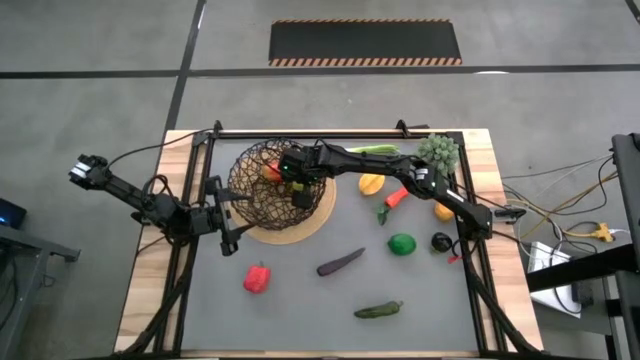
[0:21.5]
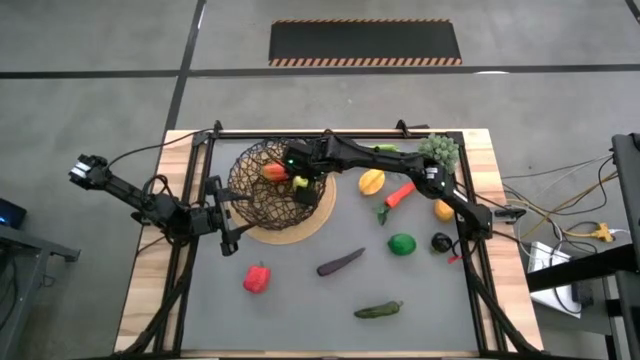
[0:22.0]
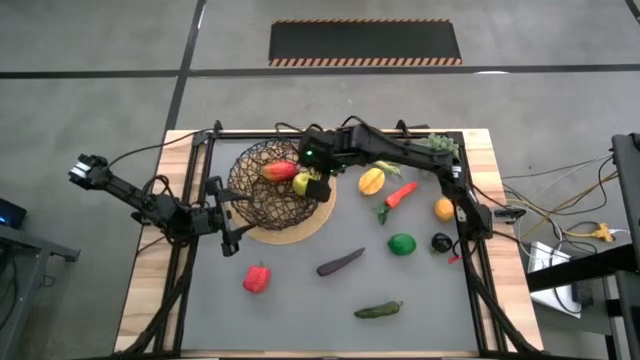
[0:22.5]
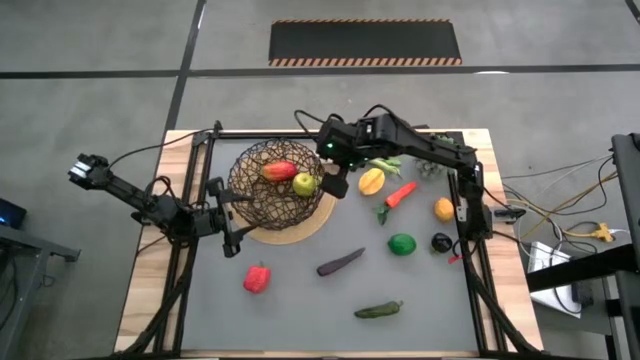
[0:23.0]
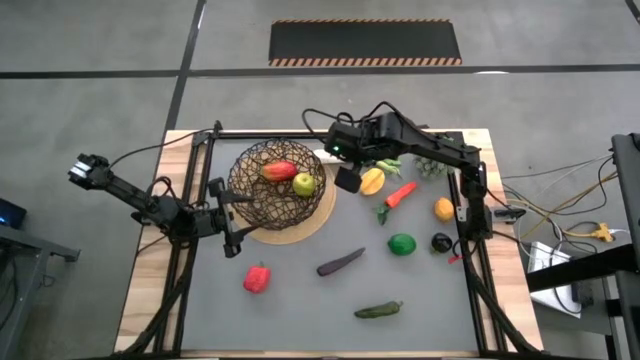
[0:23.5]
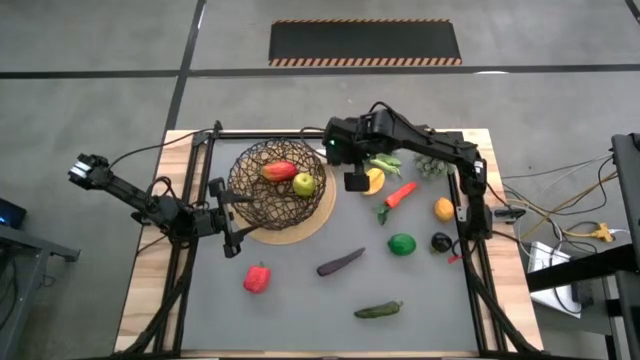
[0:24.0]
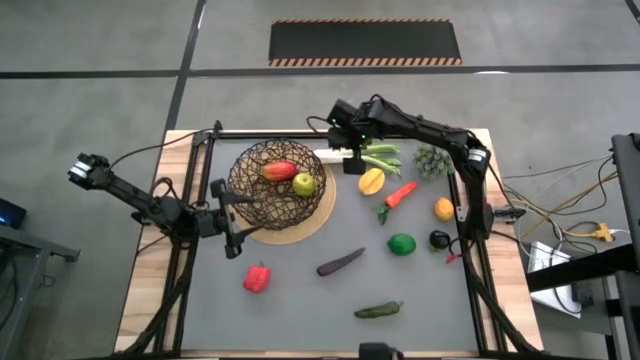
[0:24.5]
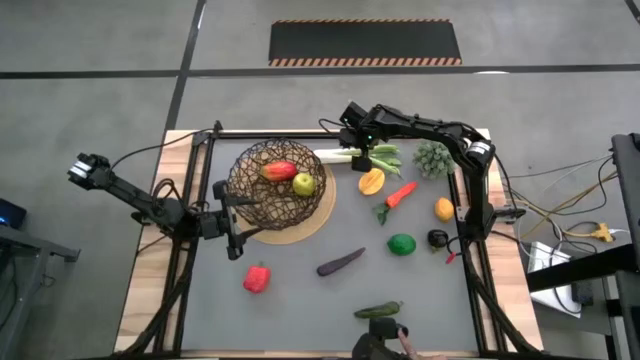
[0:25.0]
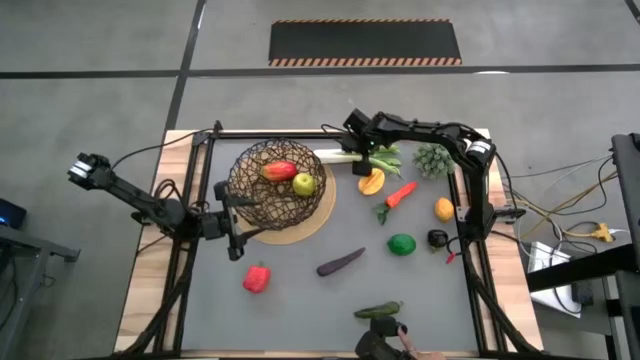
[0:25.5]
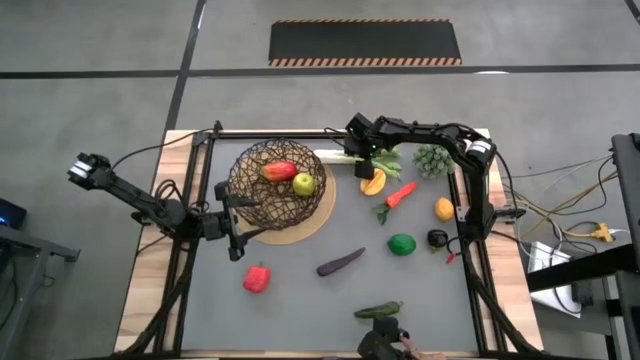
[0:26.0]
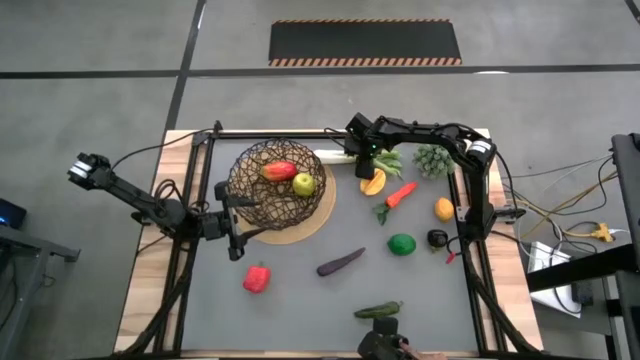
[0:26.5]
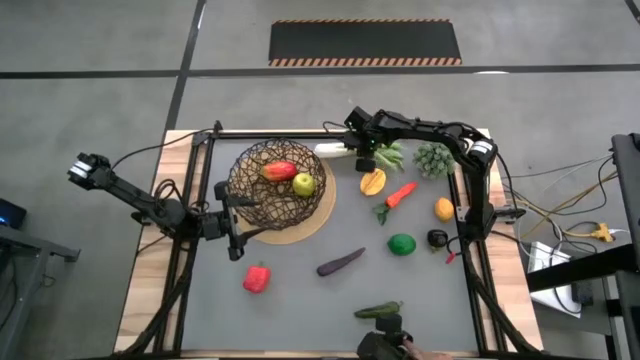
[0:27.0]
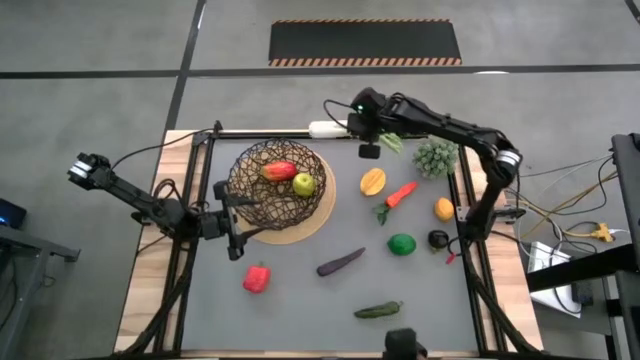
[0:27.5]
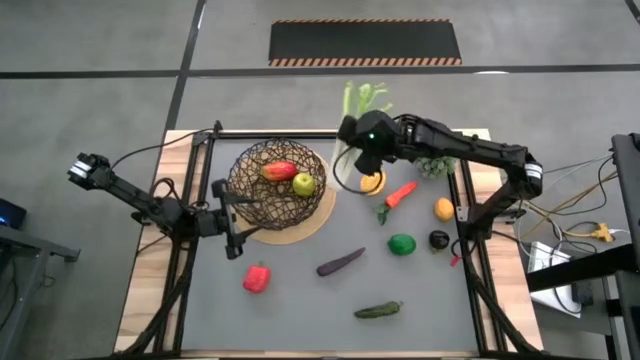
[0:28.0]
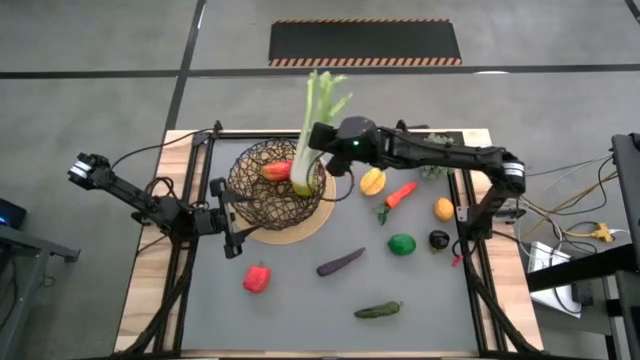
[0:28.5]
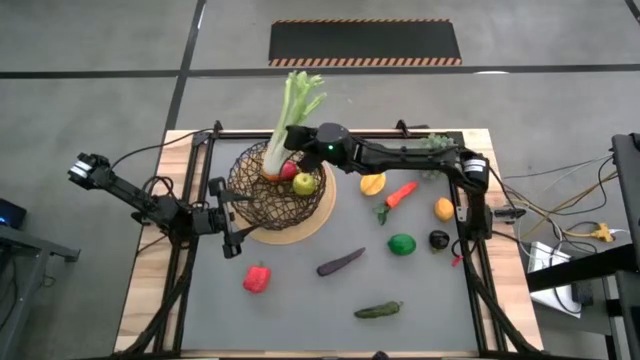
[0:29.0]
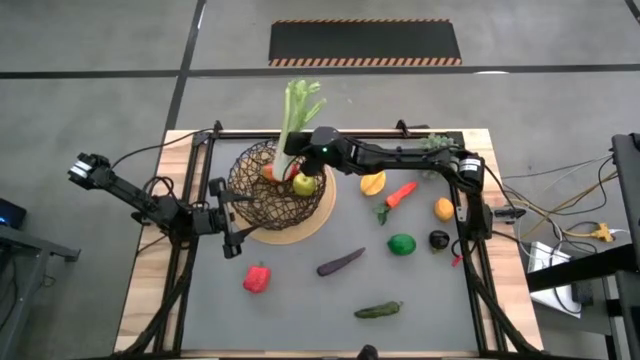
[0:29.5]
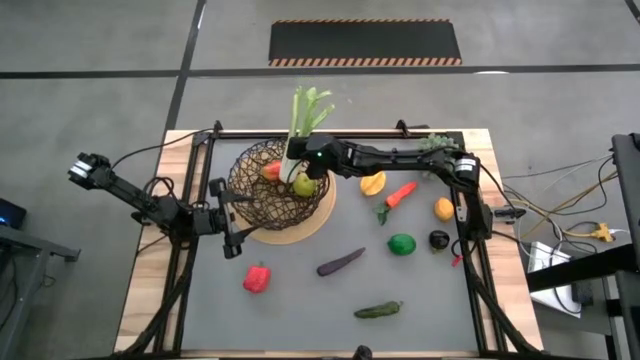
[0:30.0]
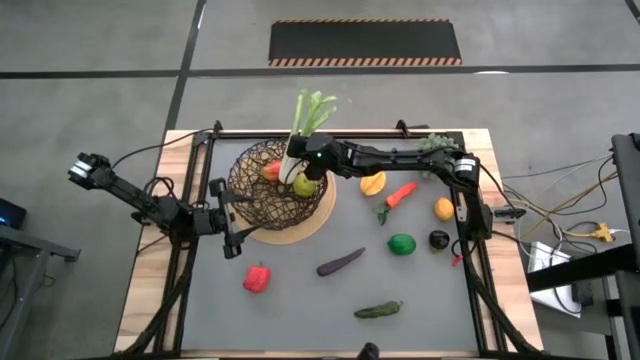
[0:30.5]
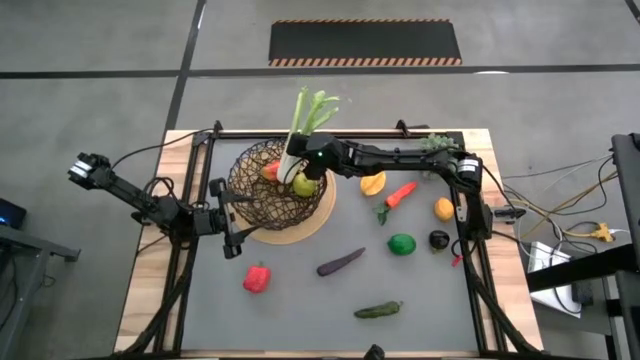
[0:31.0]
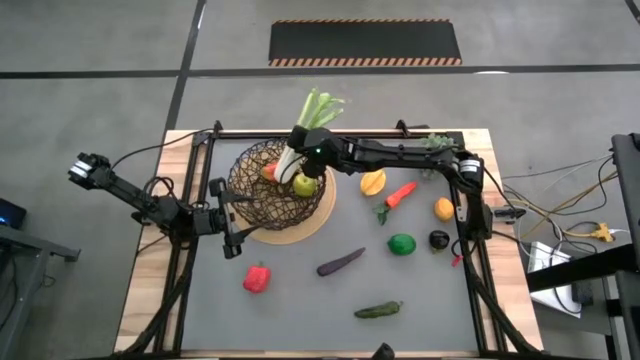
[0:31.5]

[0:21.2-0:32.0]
Task: Build produce basket
Put the green celery into the black wire basket

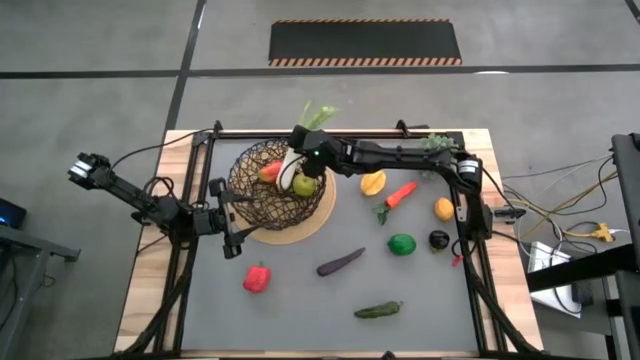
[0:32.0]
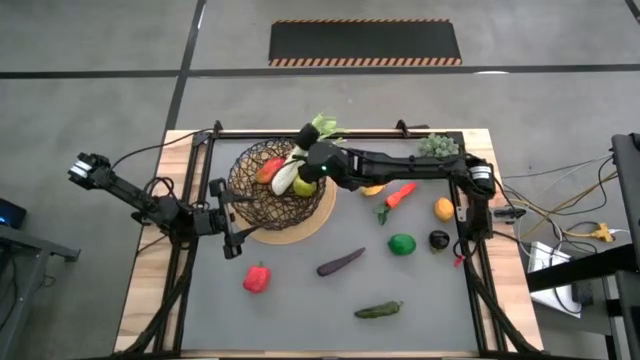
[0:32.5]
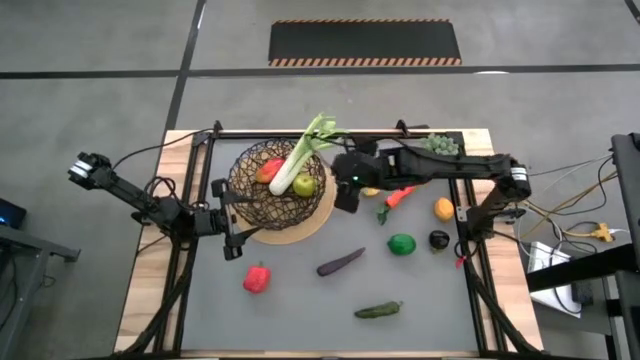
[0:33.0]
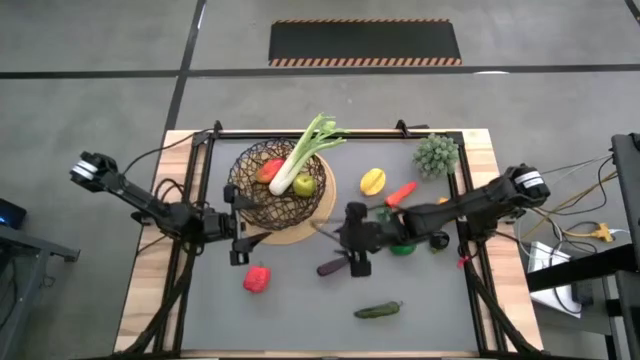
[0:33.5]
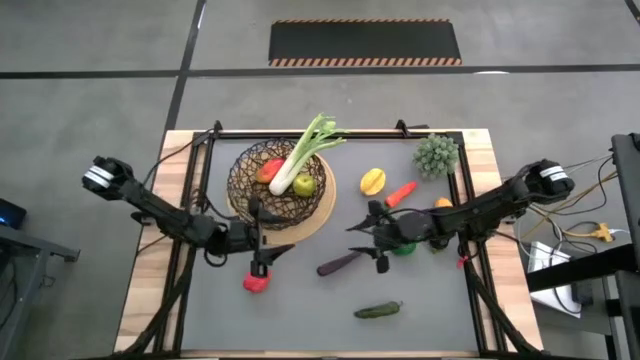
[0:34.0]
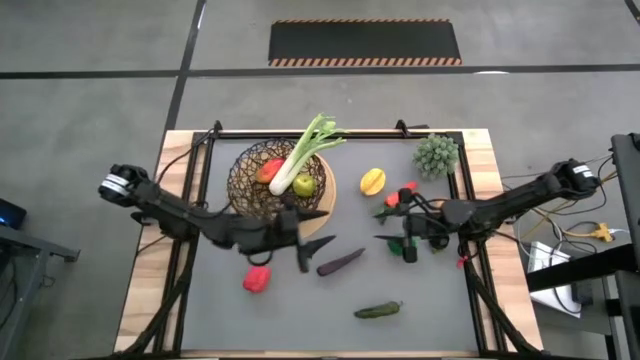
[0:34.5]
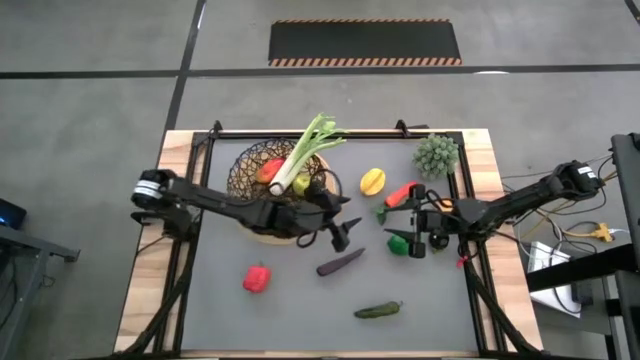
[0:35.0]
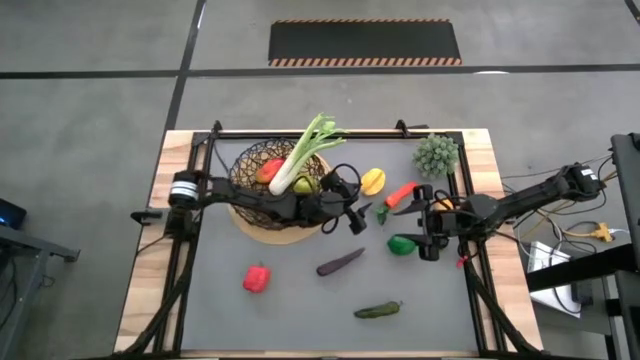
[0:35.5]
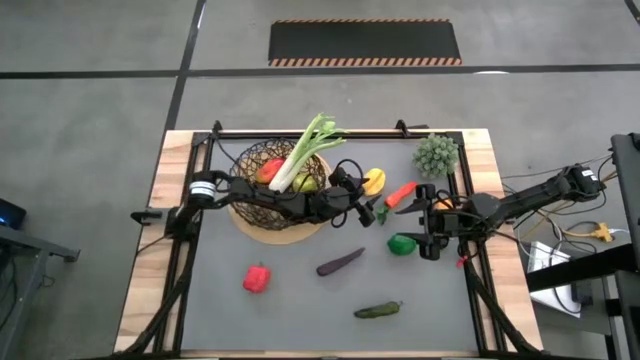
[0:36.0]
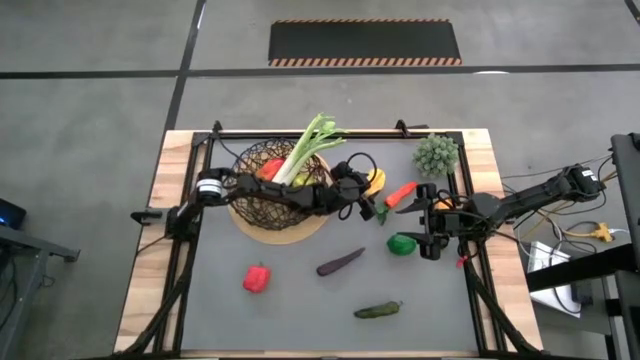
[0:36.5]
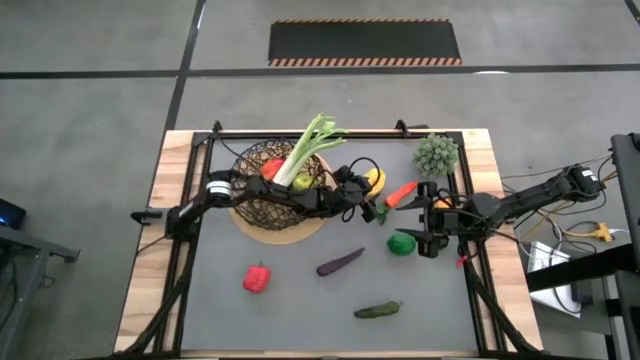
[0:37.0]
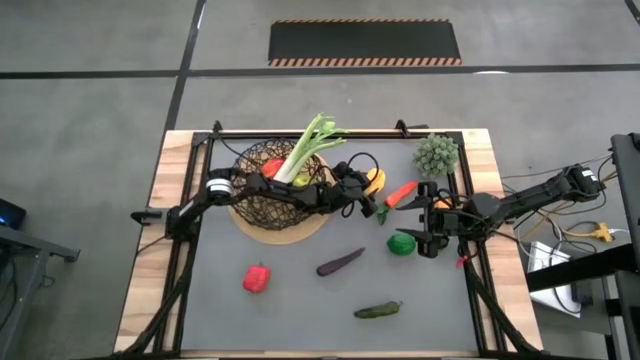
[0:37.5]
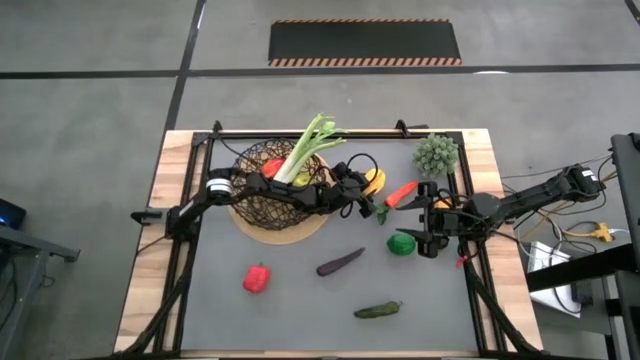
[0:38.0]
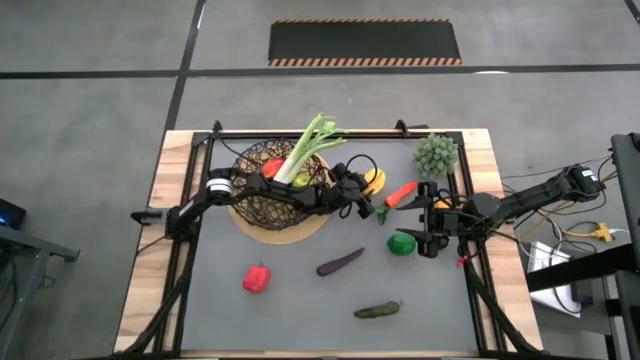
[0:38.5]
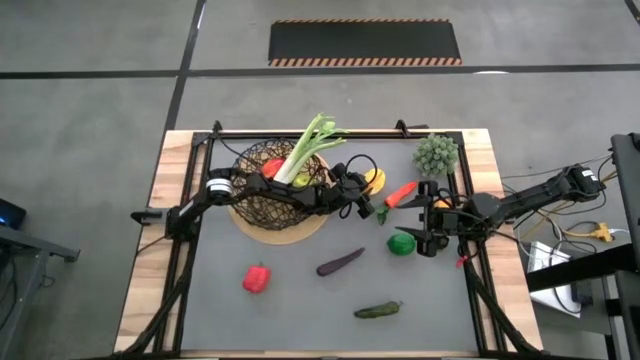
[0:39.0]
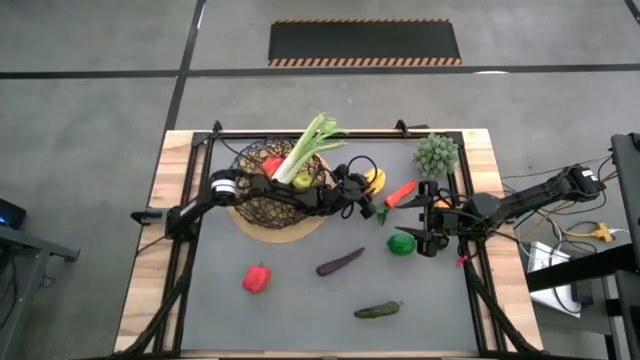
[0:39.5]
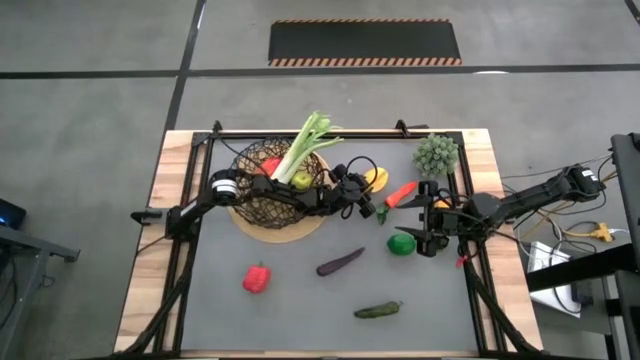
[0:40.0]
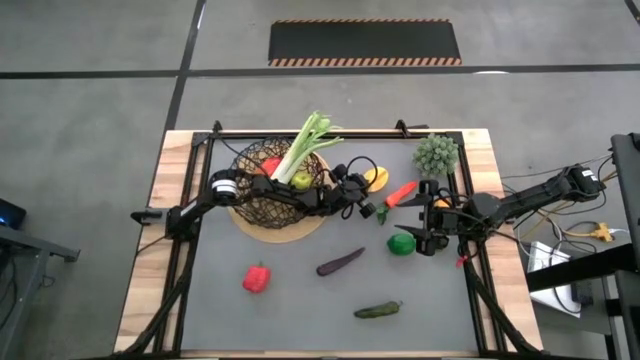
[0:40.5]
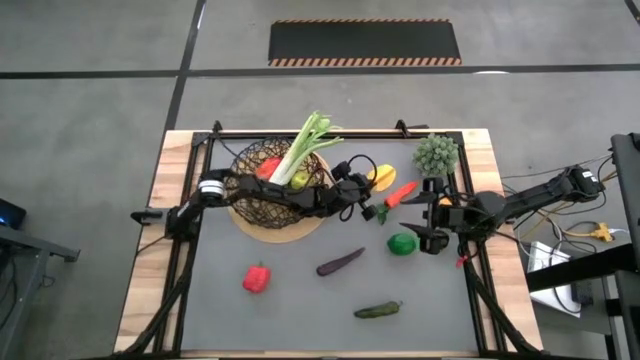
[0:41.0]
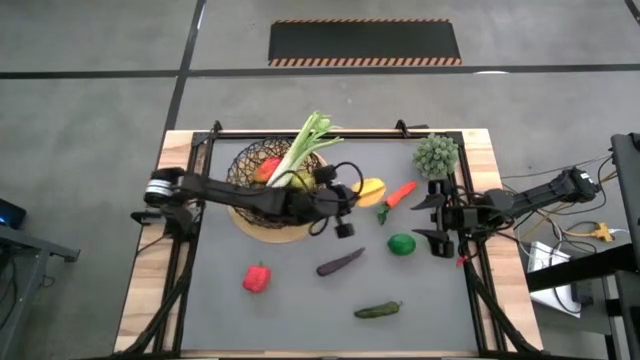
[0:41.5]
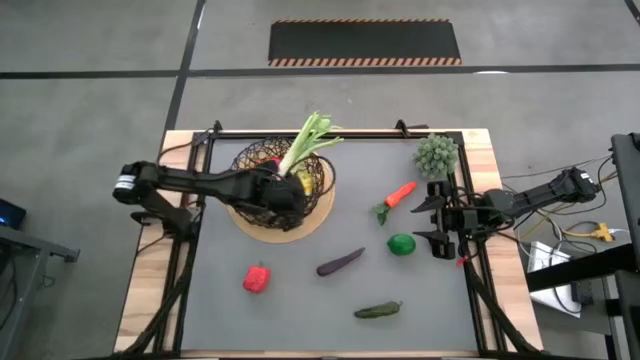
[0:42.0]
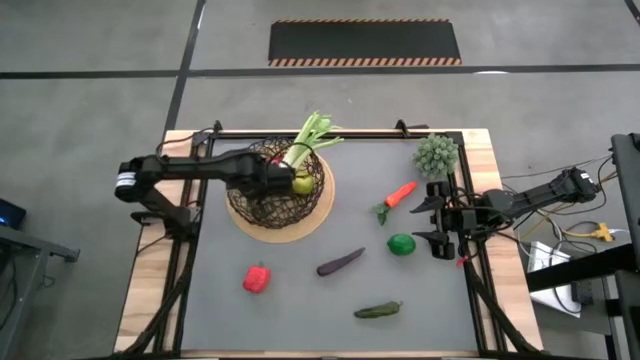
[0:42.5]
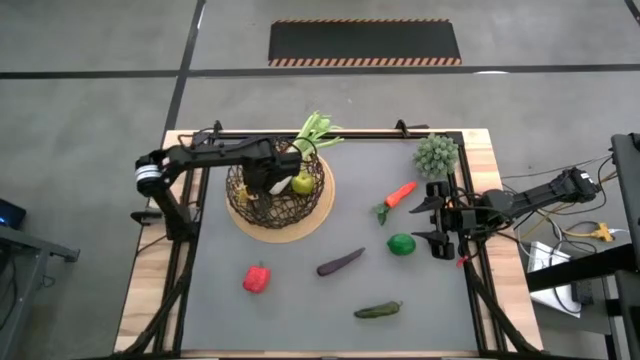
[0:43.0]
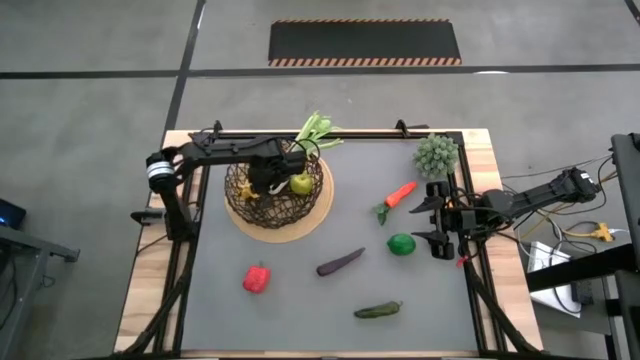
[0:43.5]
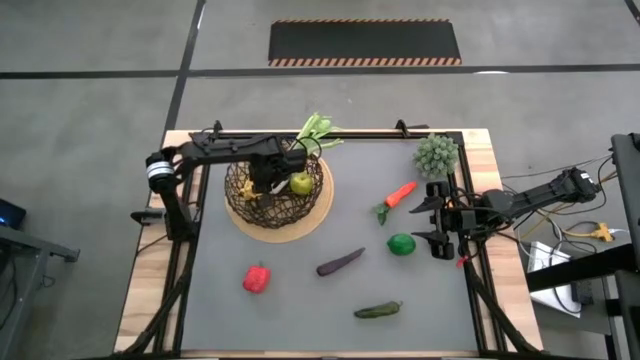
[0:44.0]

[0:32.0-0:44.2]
Put the yellow starfruit into the black wire basket
